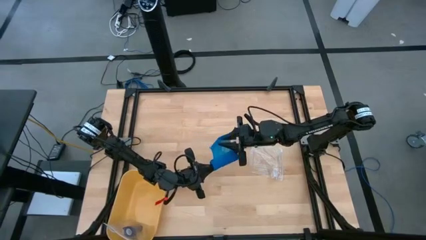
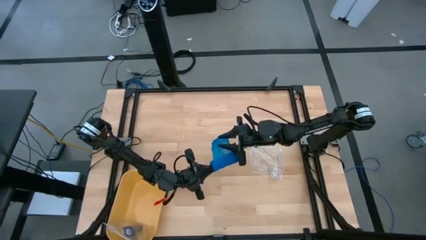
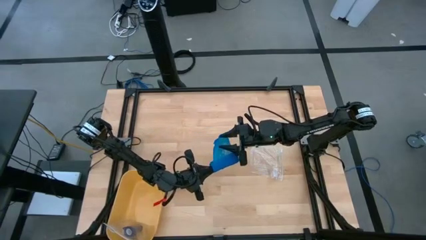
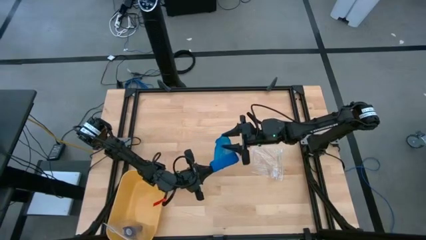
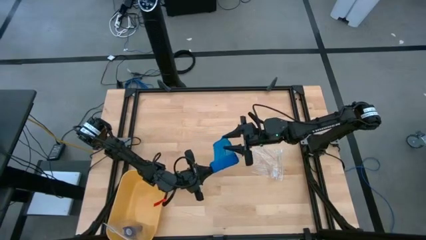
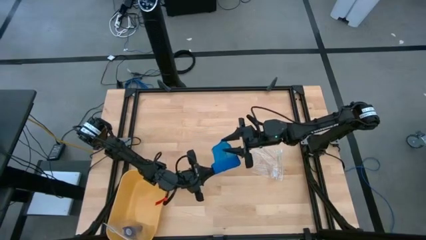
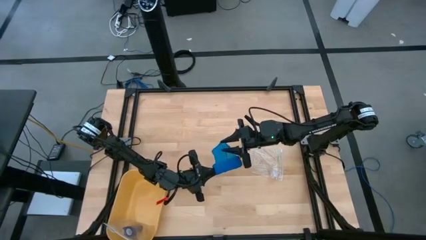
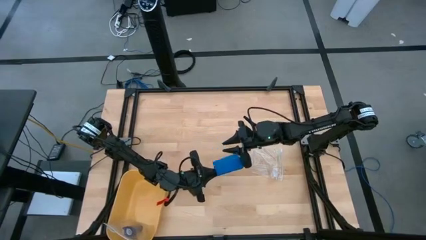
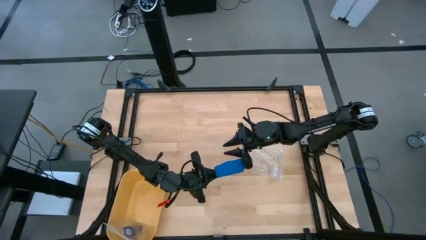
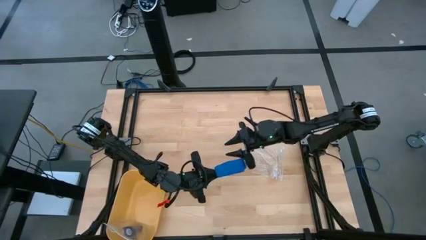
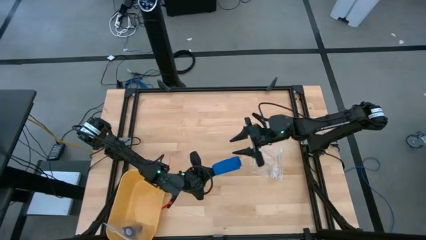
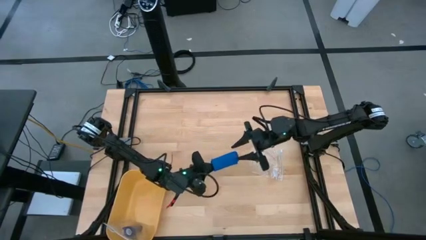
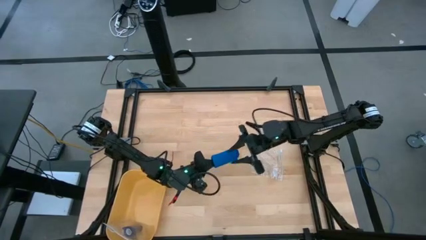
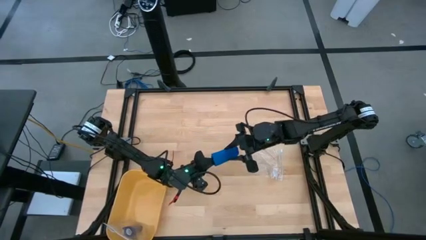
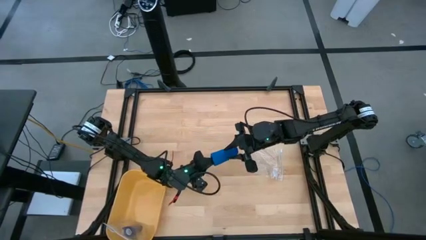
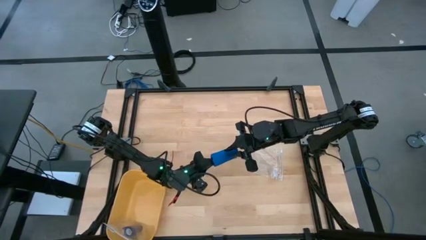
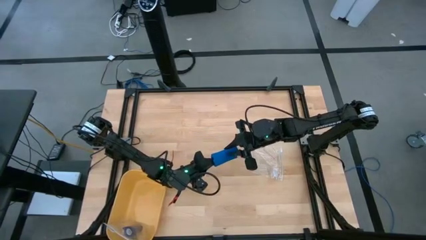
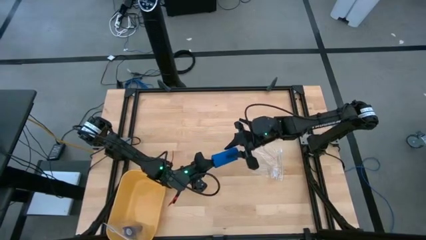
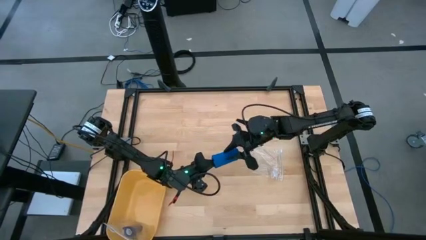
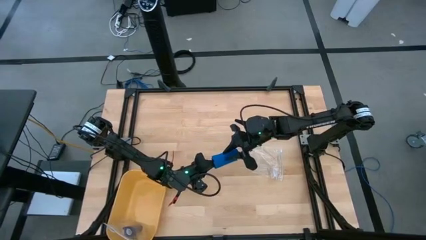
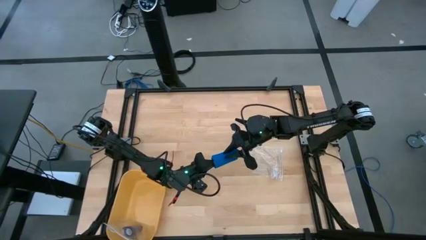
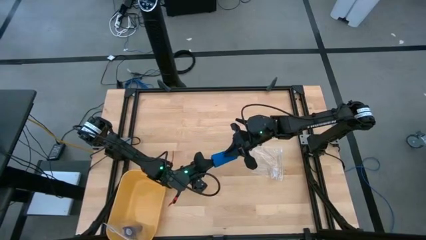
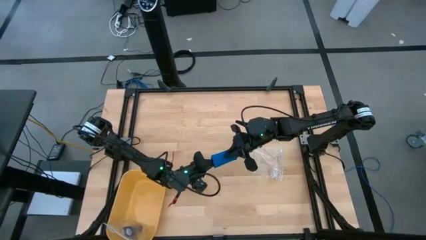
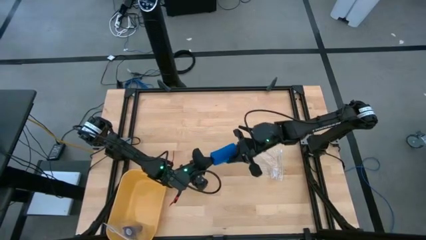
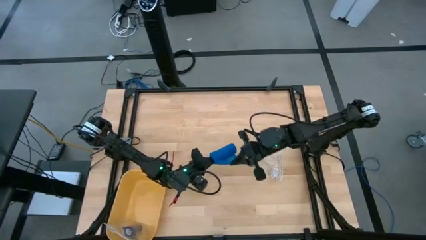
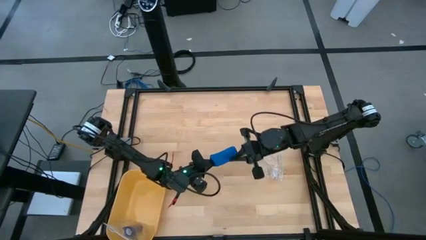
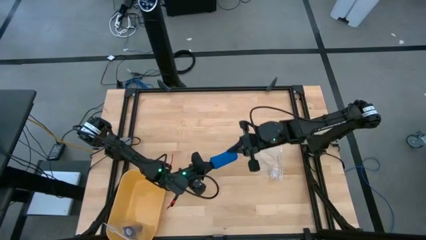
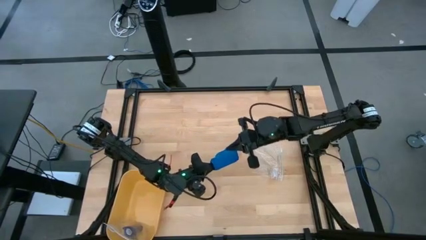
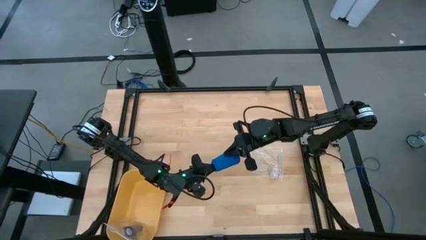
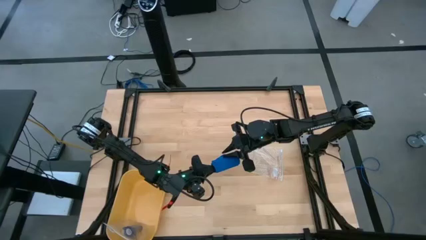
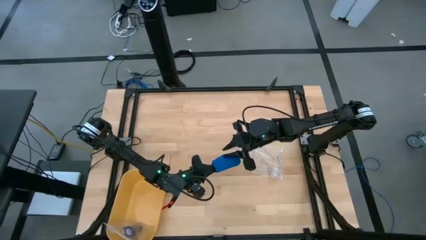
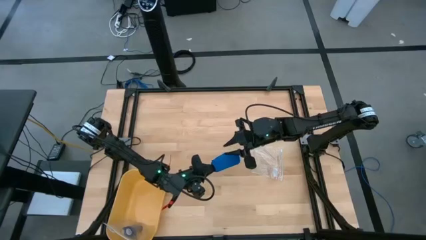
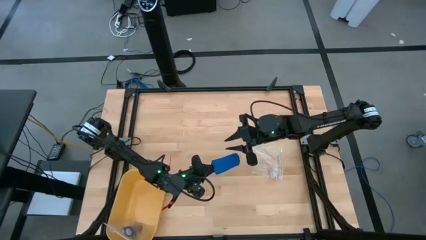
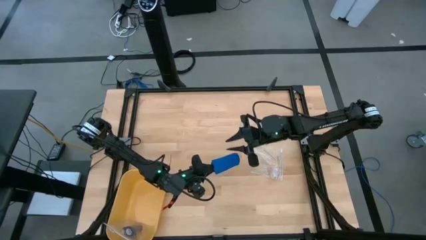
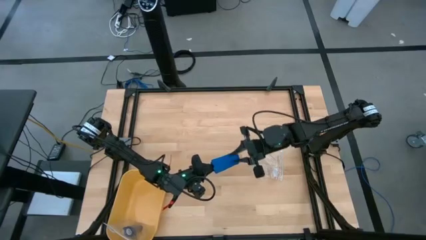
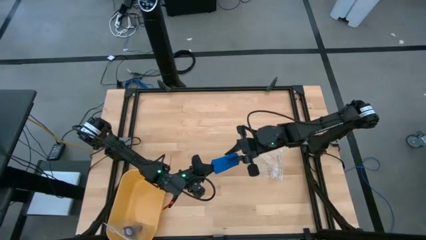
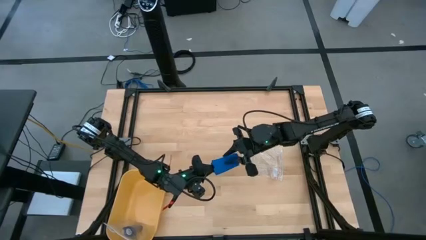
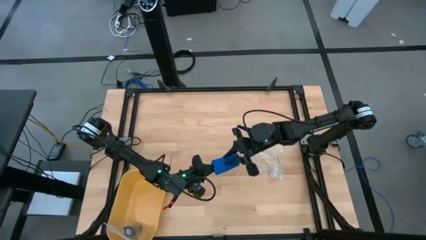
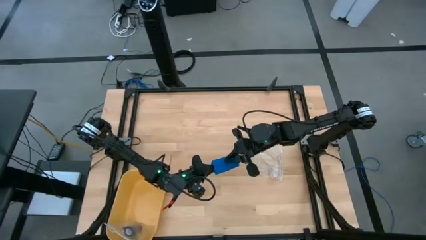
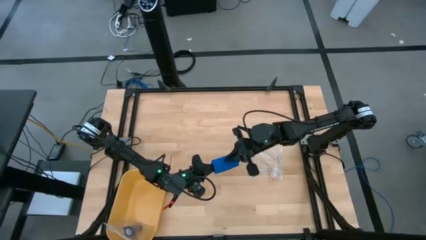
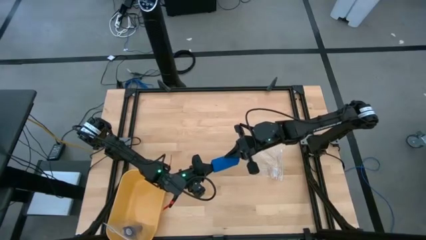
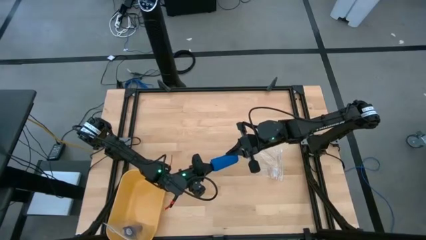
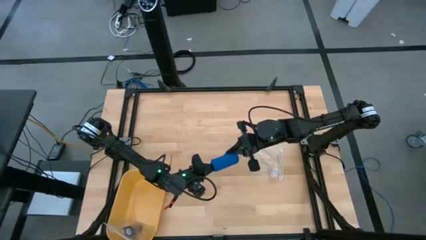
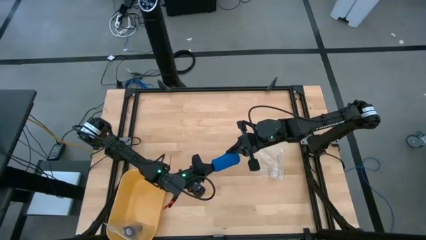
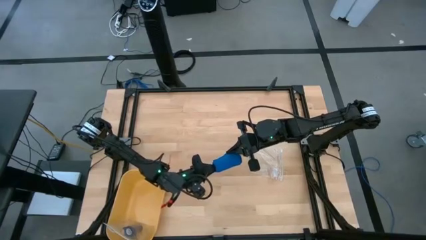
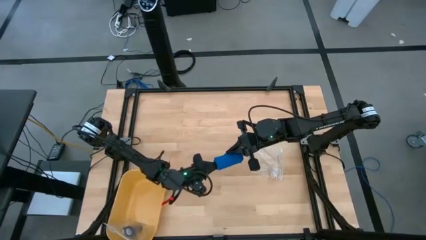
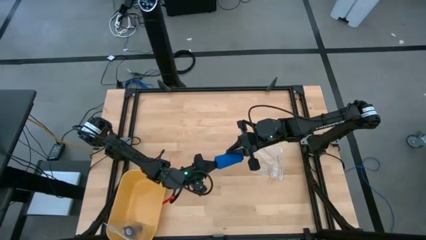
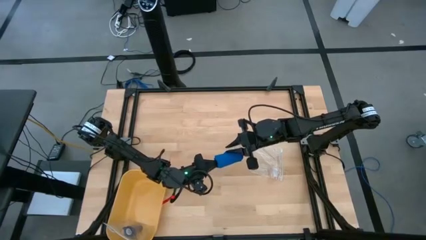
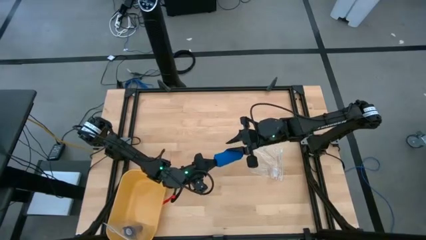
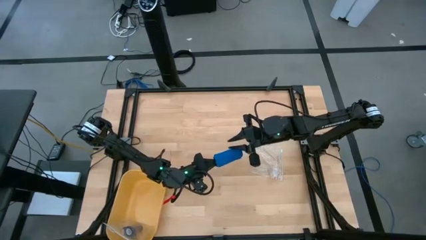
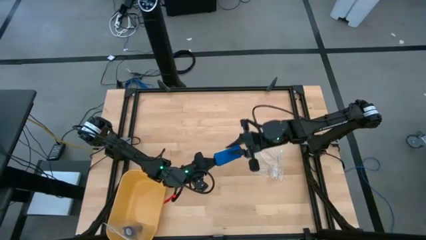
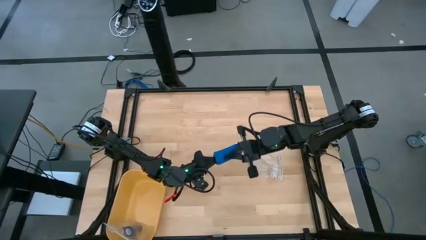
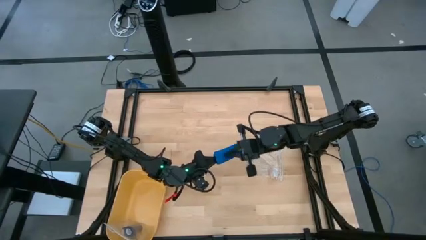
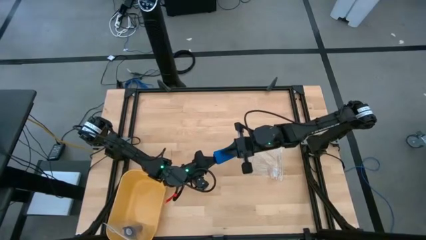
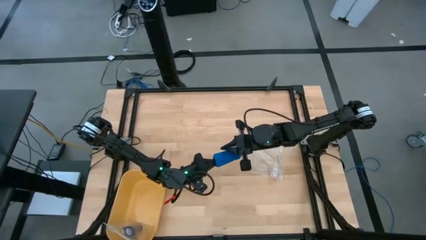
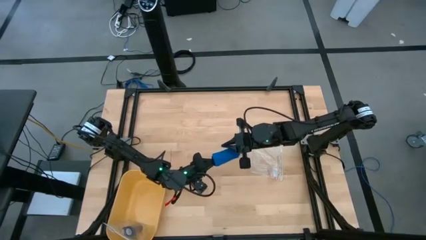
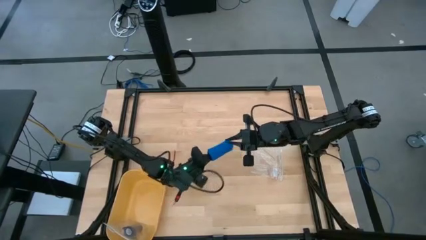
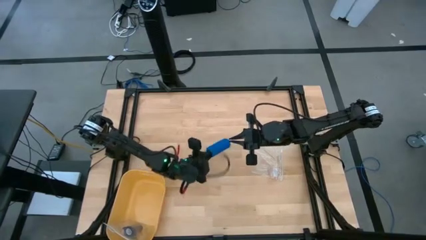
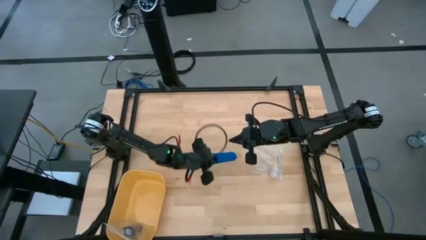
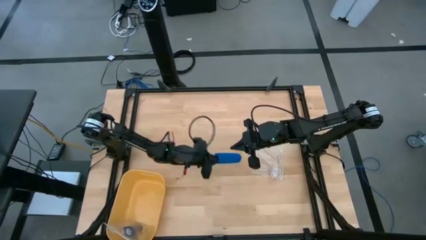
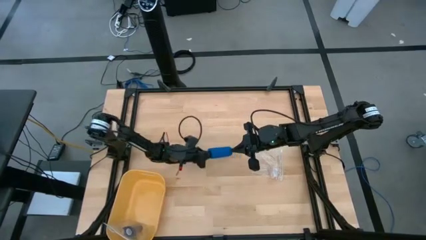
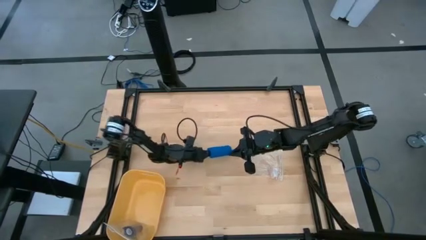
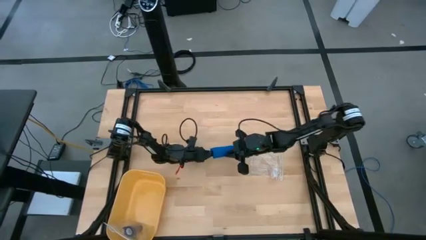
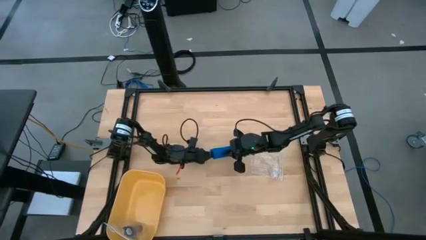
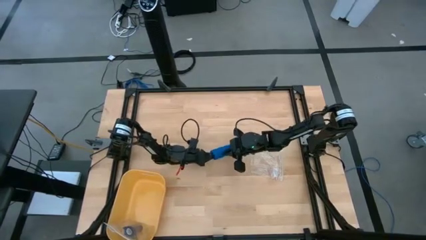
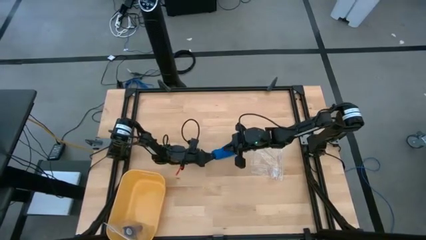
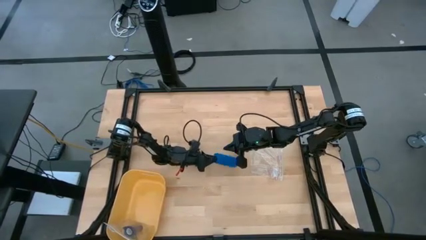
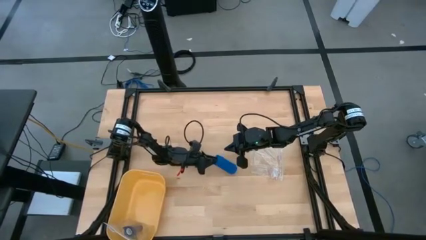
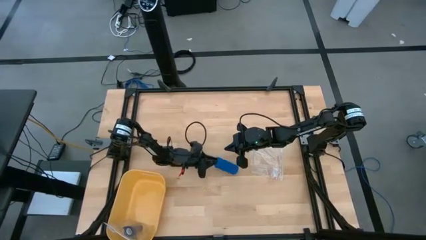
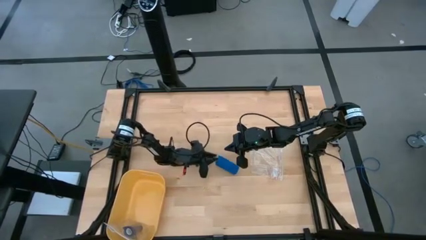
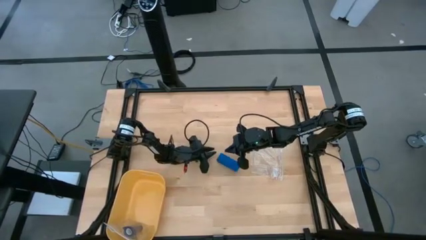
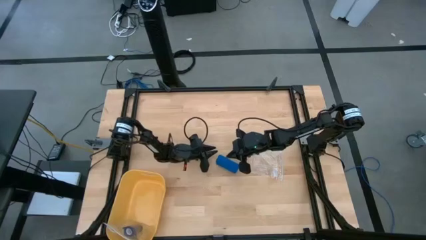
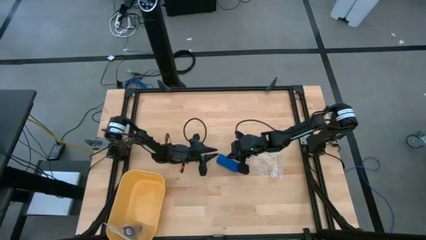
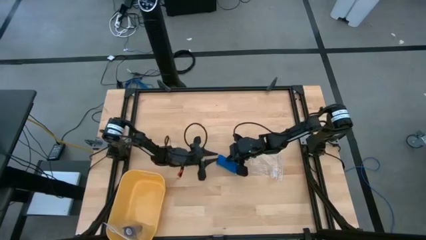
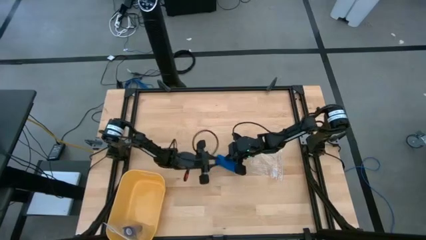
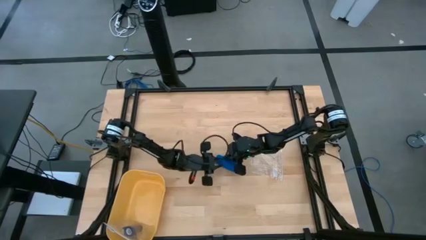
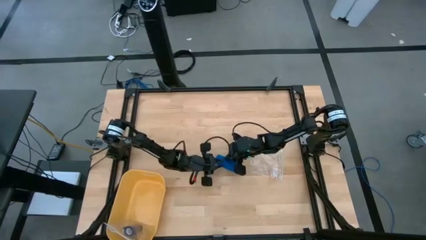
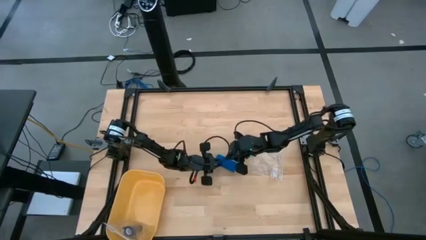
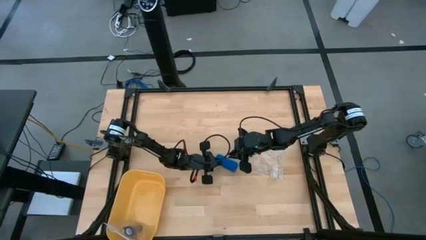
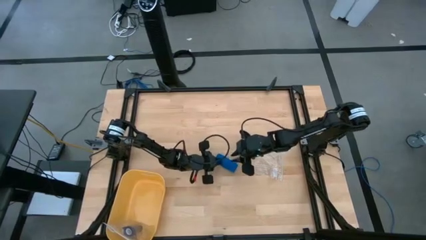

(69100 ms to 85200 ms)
Task: Roll bandage
Roll the blue bandage

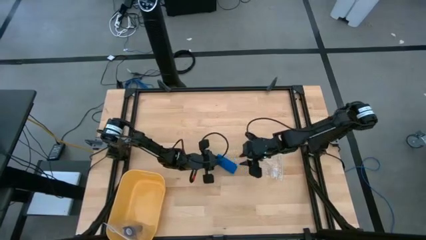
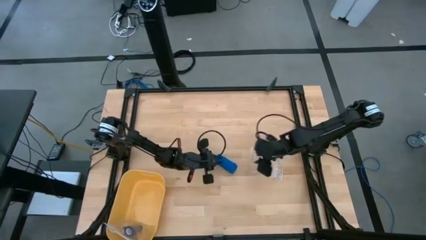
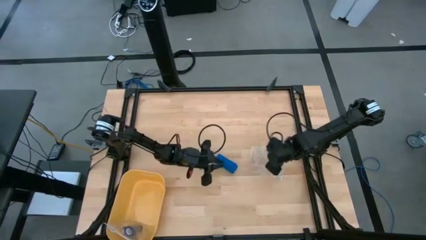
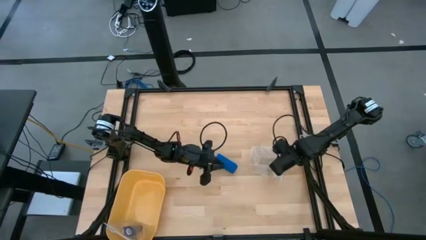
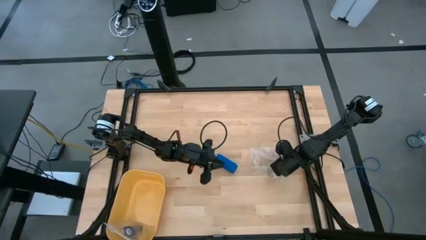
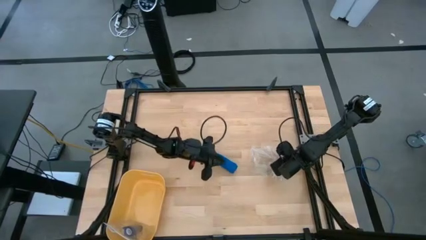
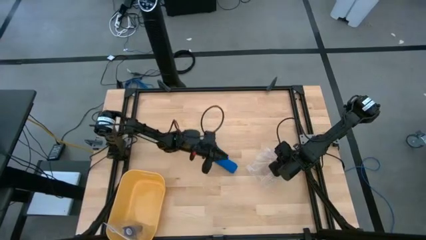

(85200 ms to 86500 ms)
Open the zip bag
